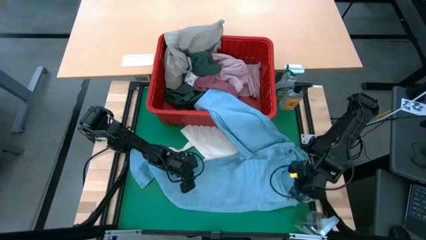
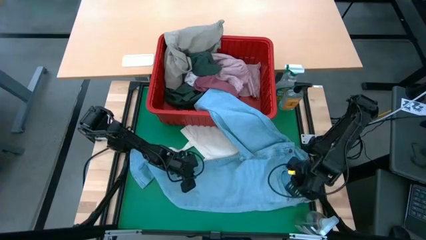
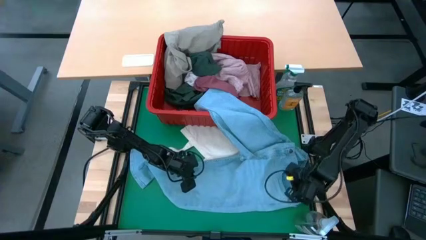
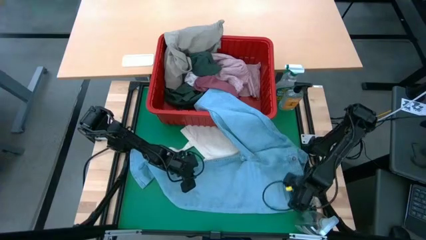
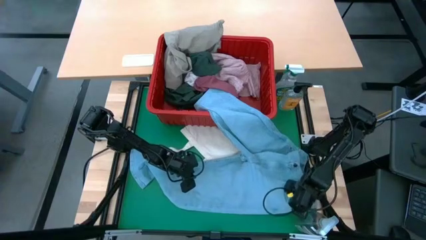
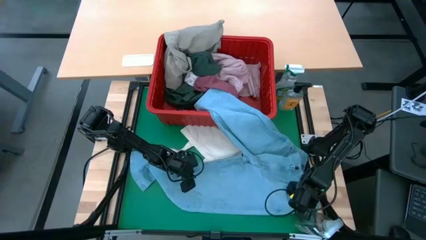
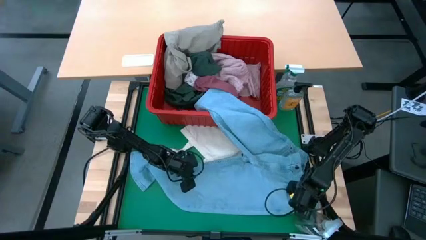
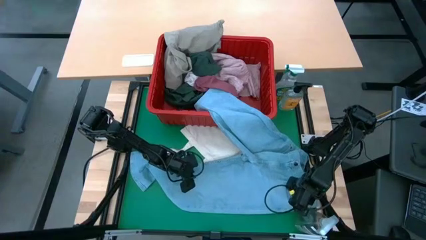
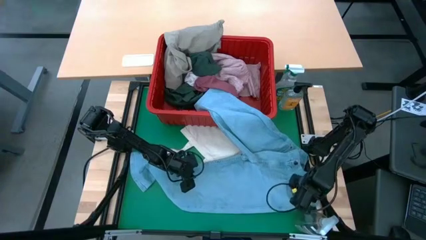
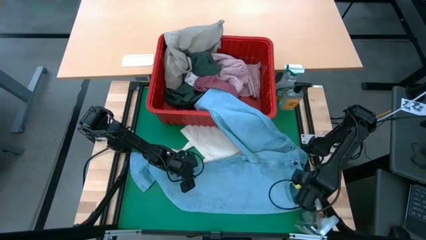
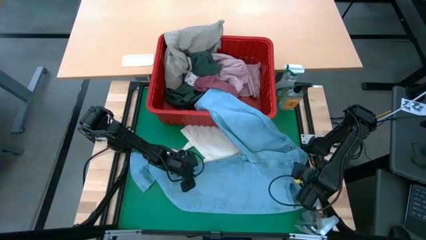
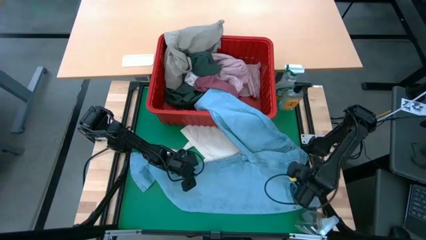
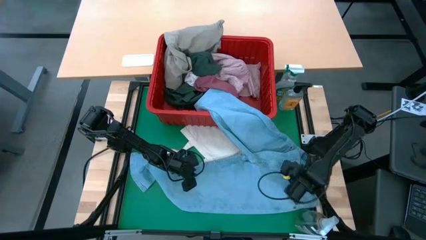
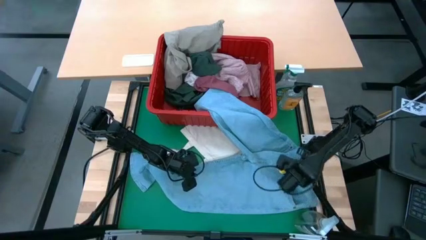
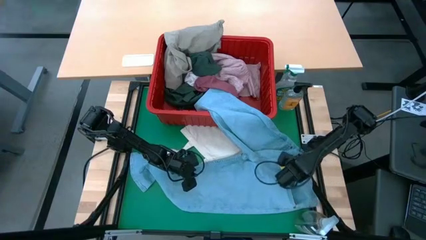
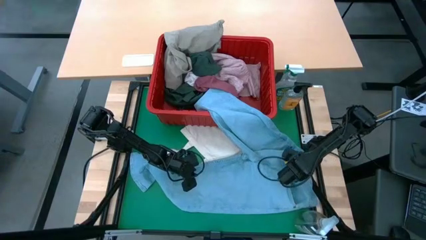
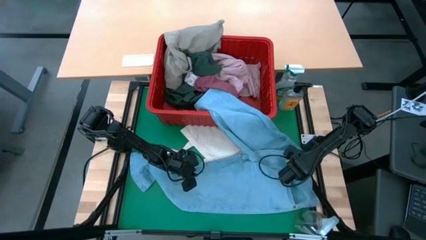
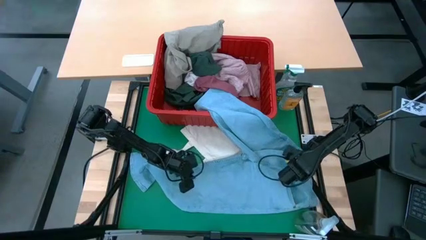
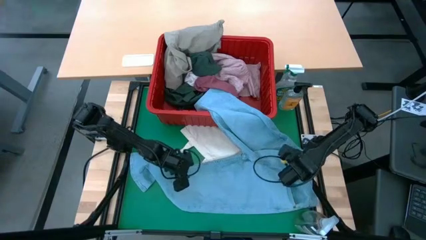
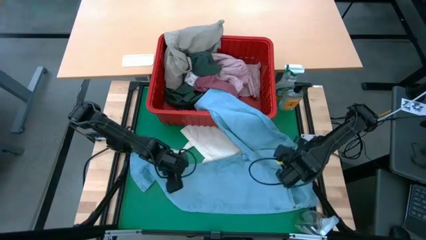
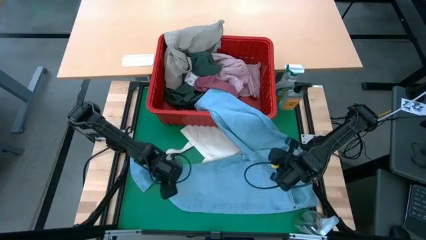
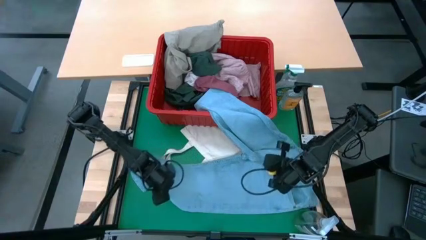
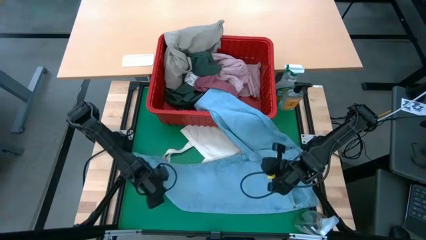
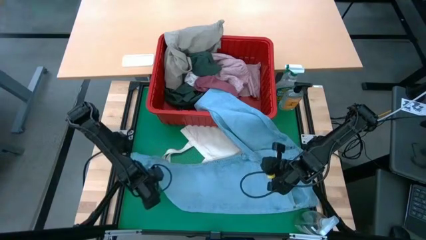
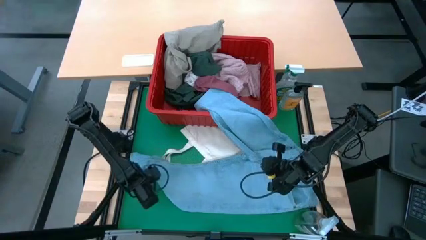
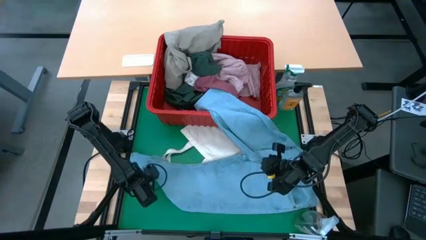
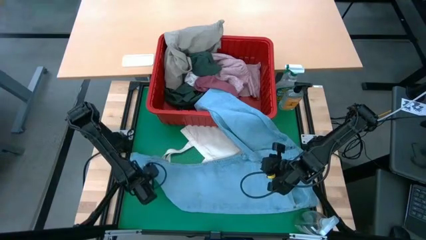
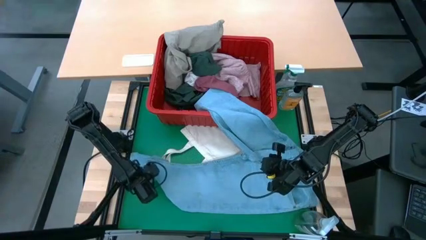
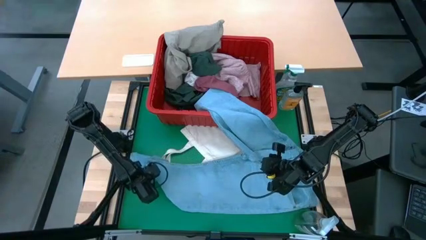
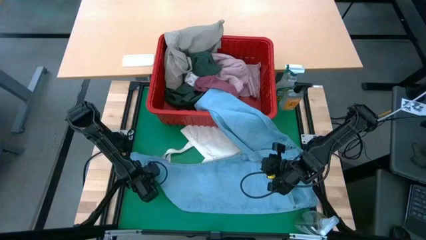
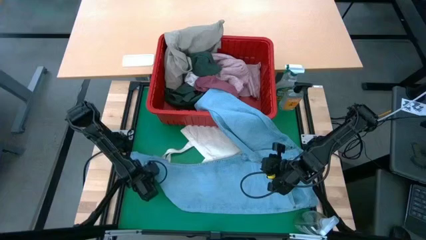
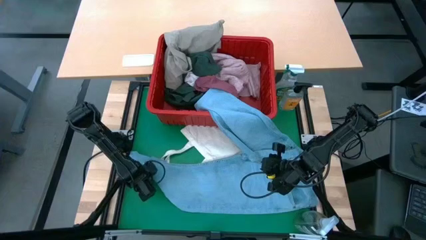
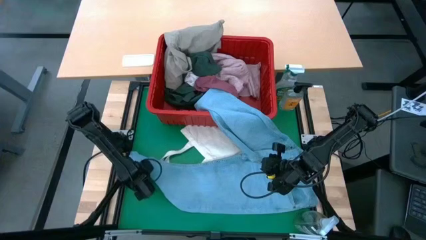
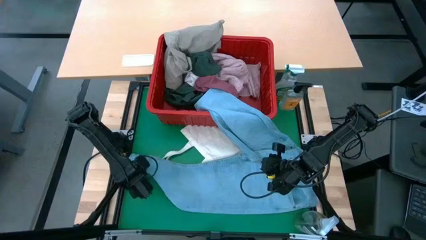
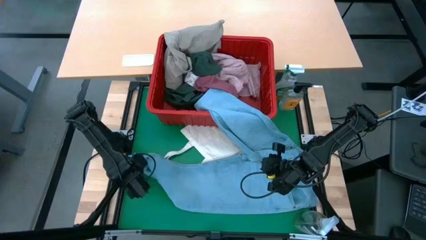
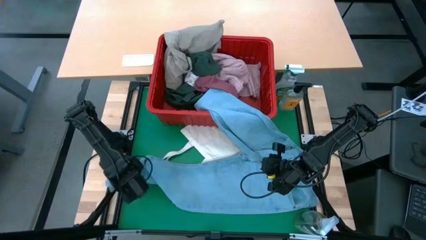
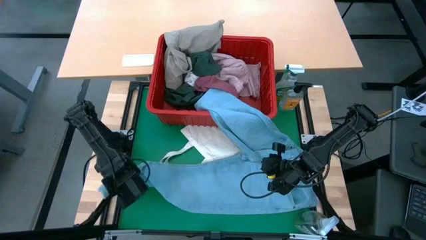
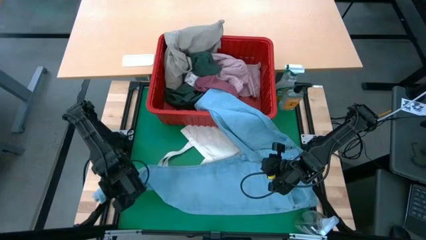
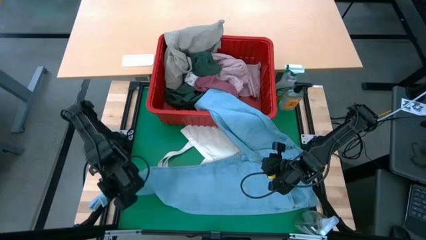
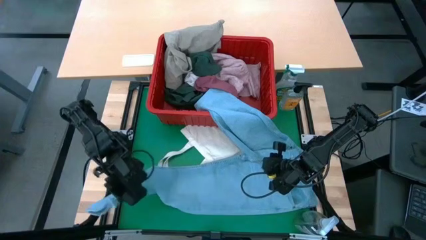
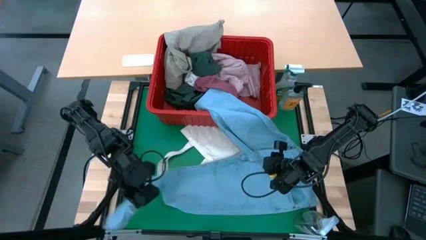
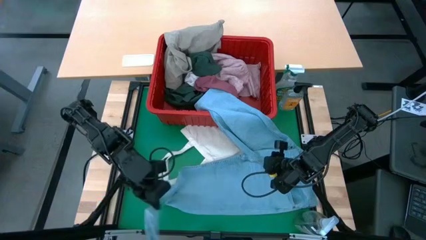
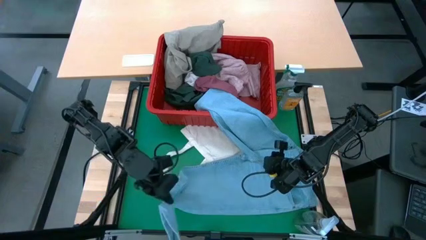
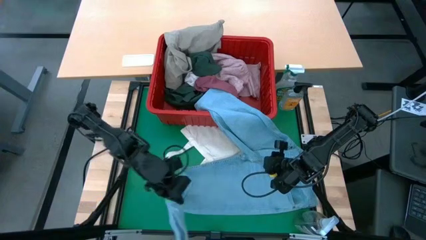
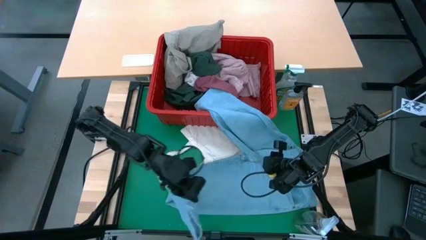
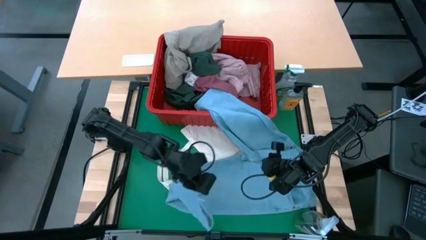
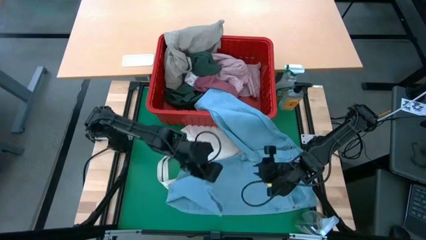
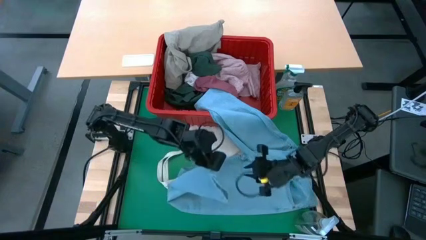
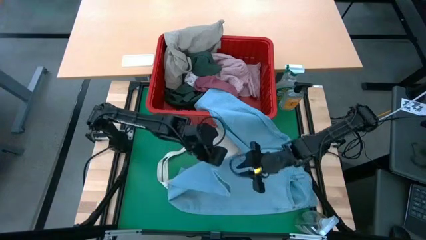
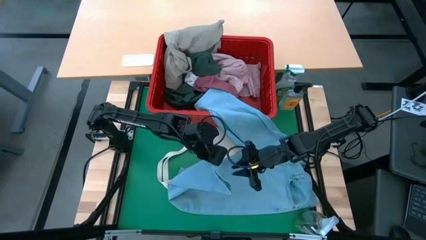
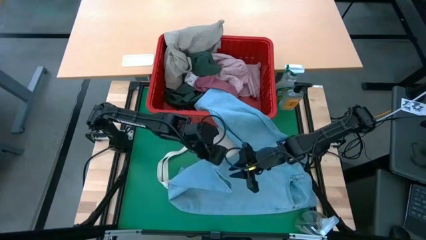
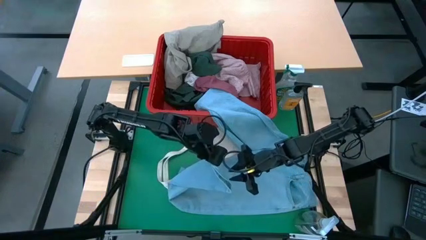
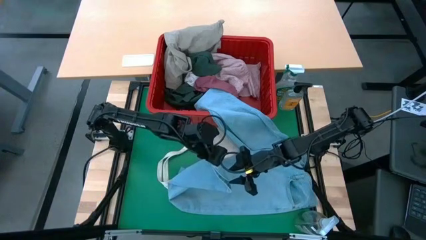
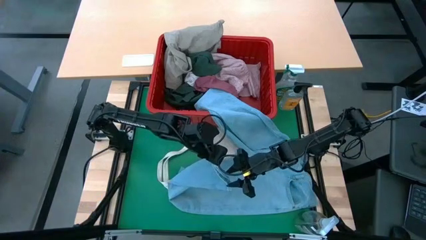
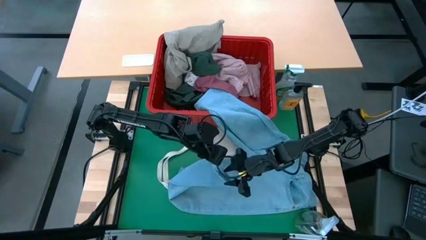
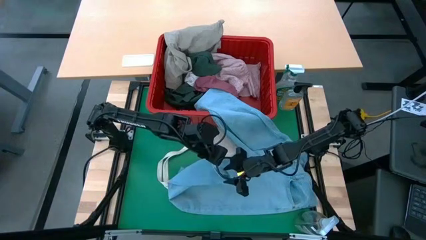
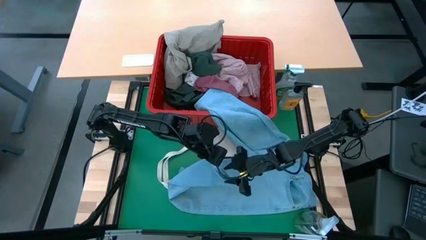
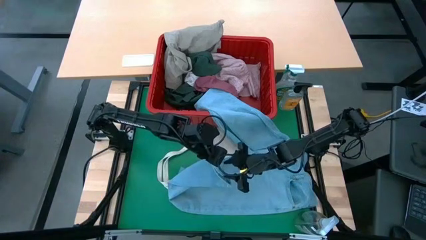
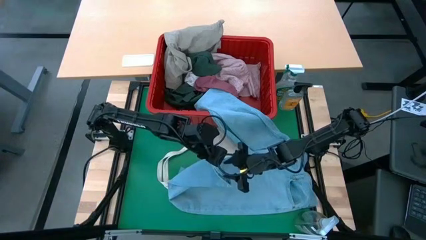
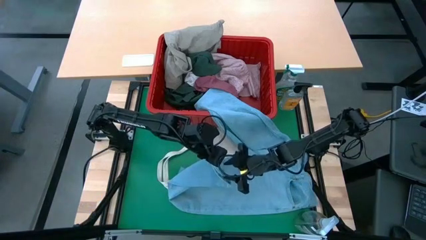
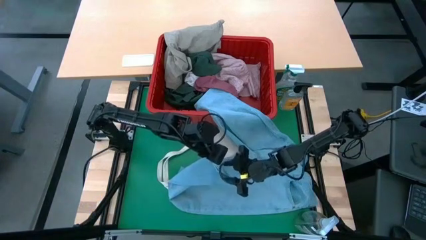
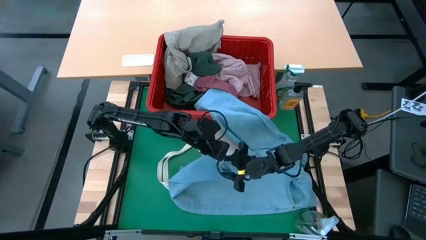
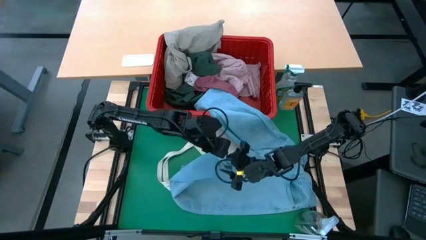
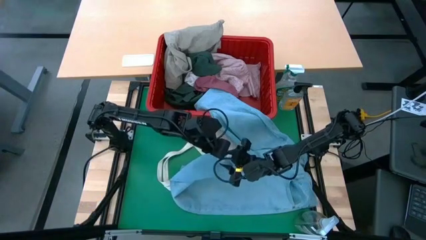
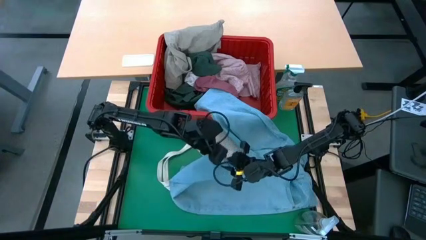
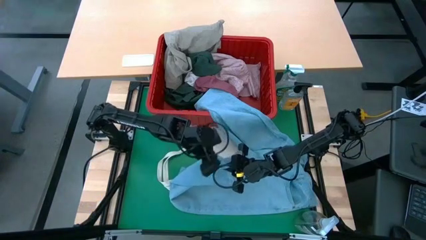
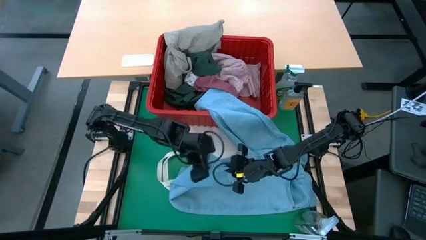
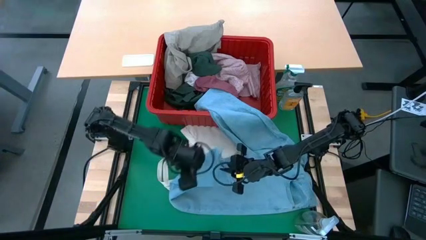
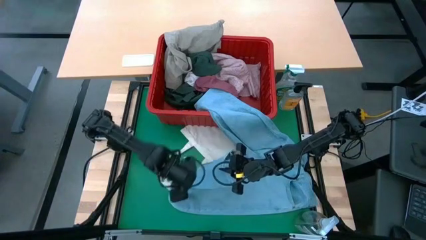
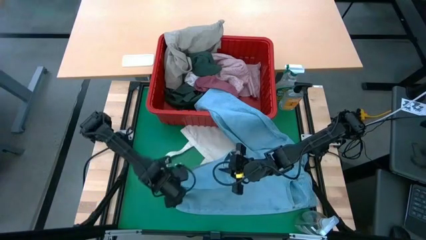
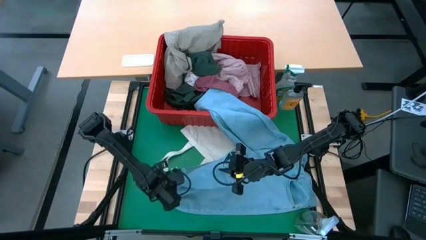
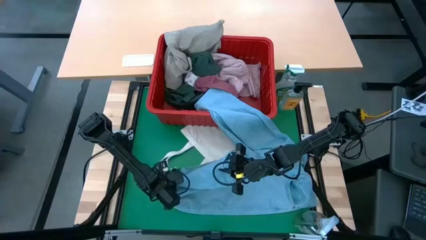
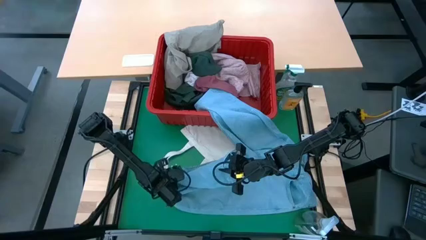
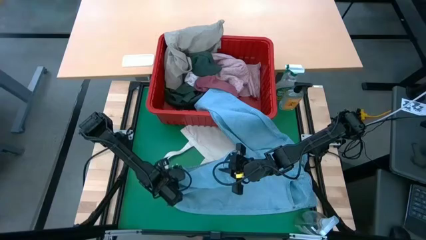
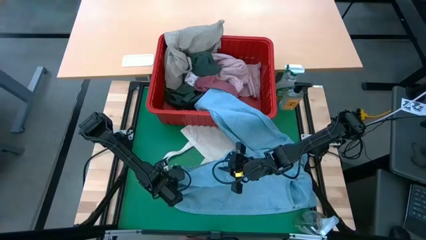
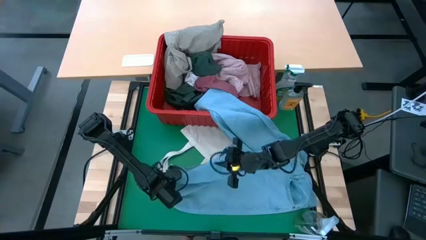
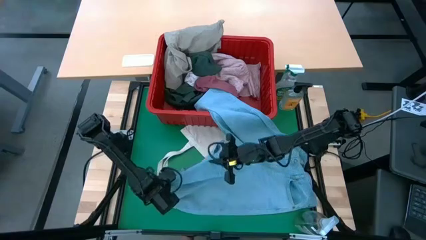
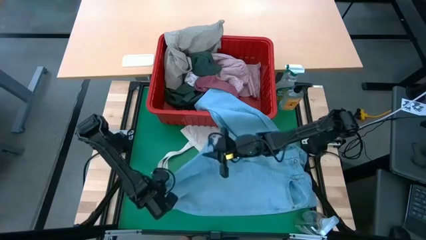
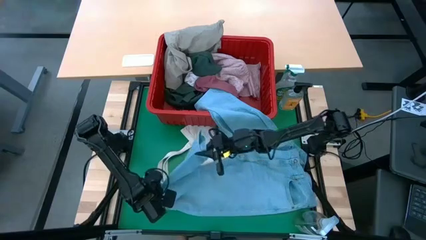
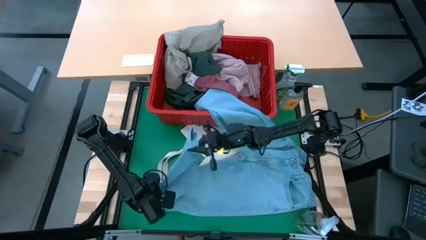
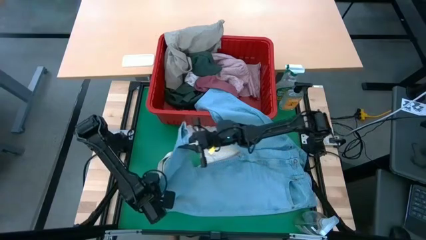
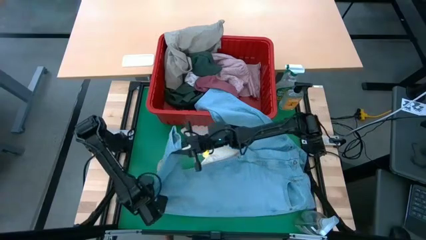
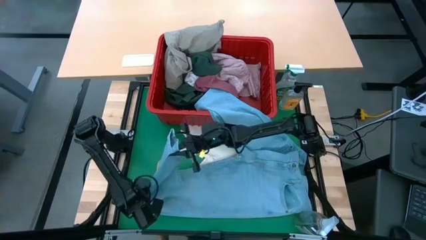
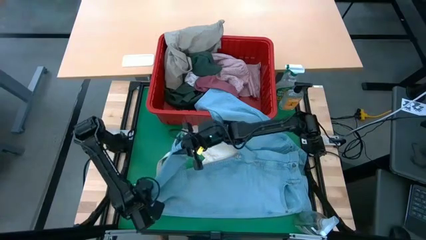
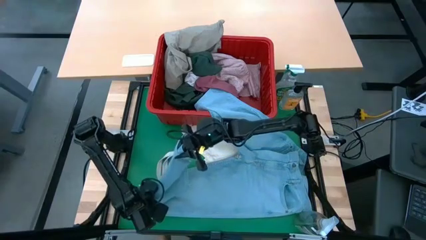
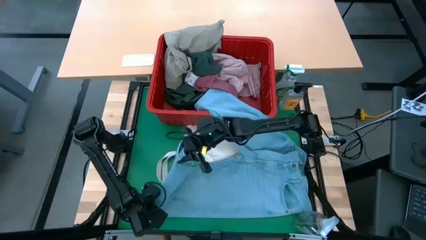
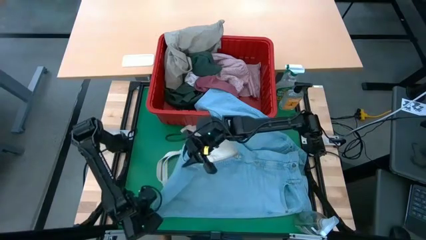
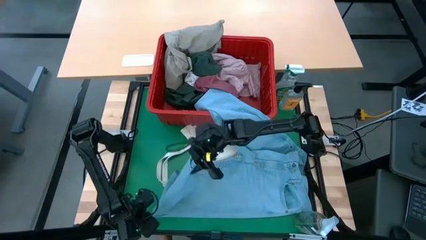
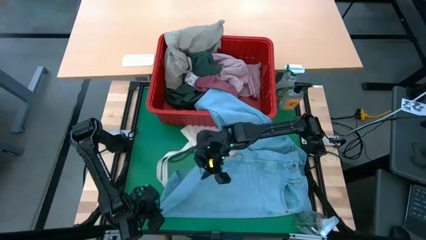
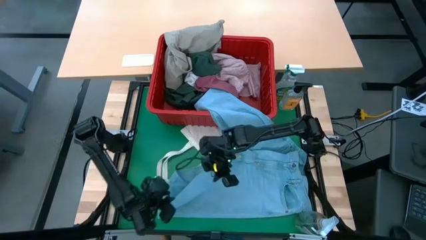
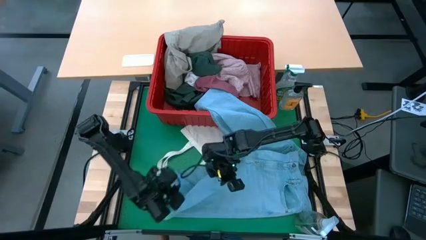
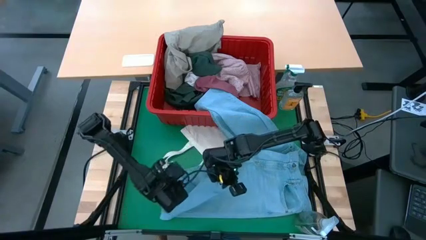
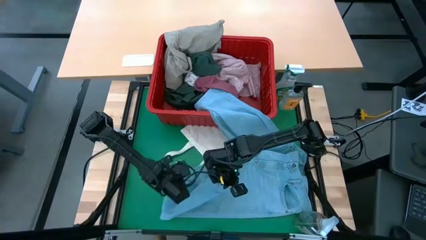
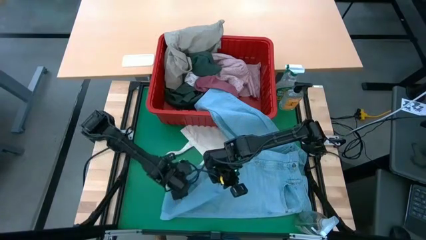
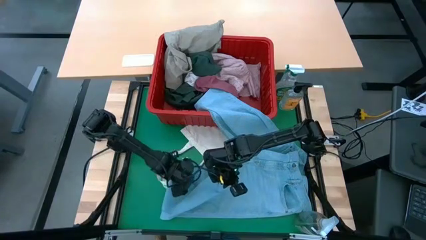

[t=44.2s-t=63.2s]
Task: Fold laundry
Fold the blue jeans
